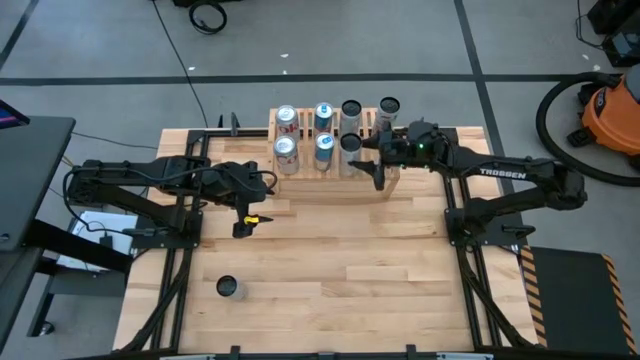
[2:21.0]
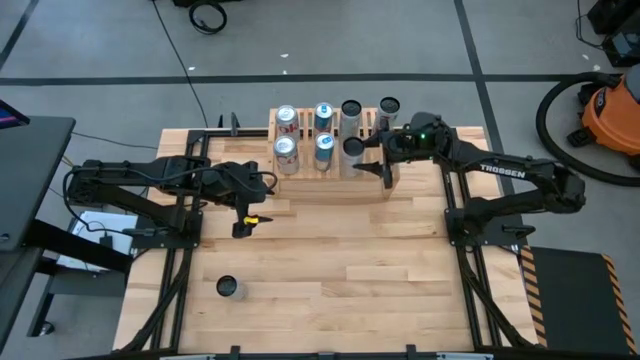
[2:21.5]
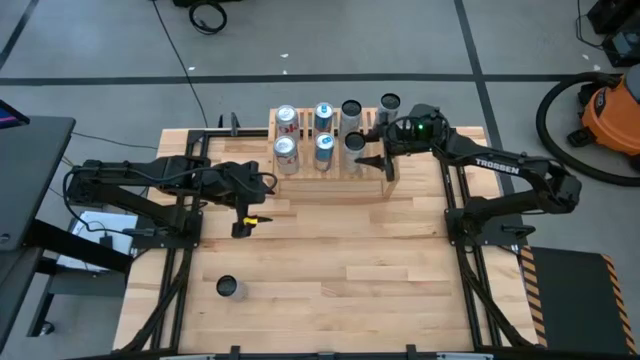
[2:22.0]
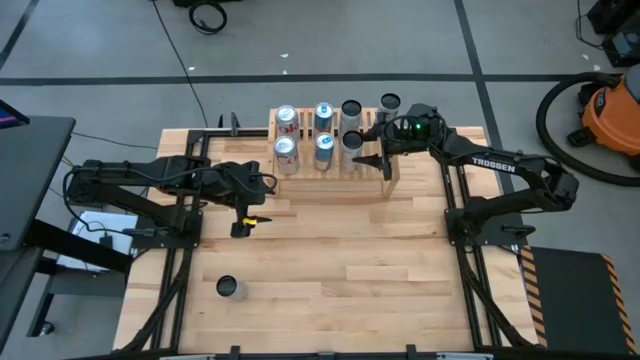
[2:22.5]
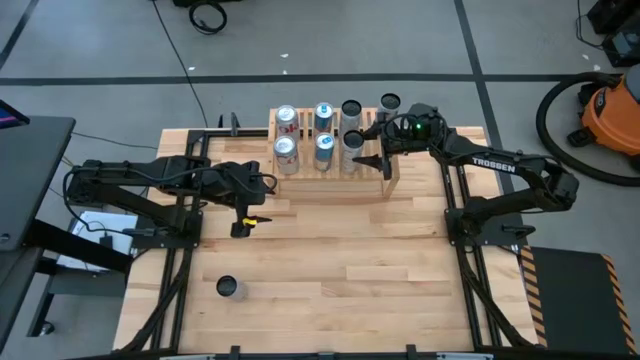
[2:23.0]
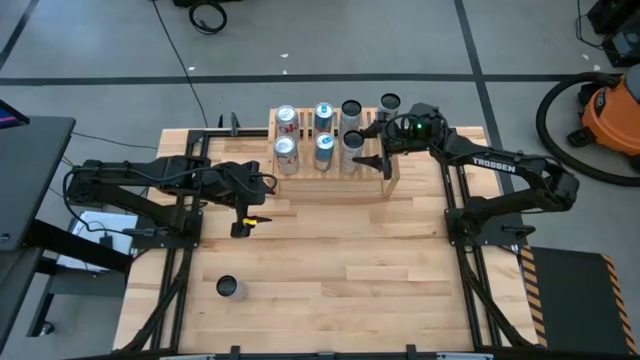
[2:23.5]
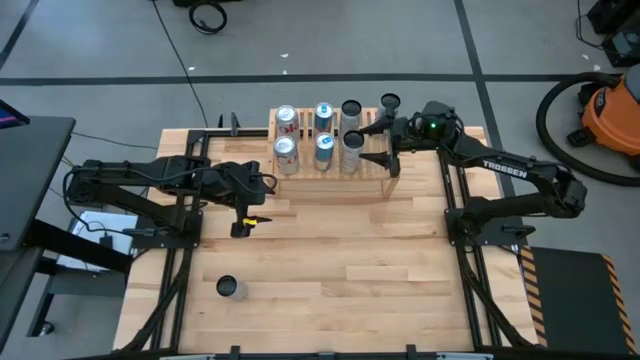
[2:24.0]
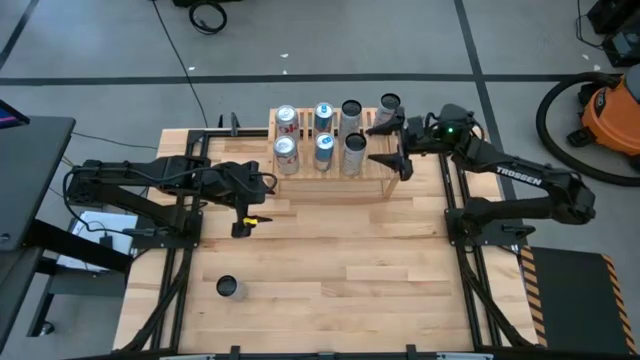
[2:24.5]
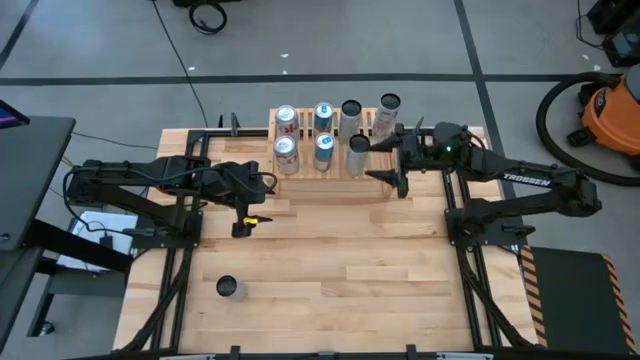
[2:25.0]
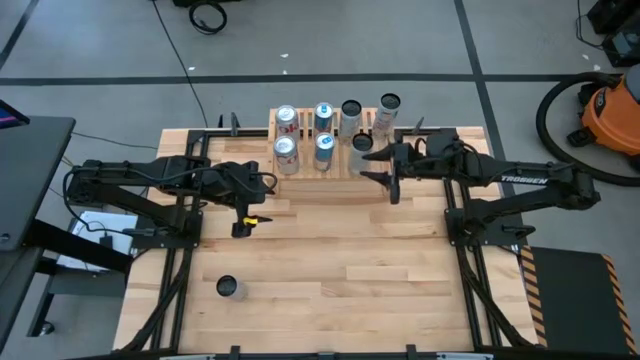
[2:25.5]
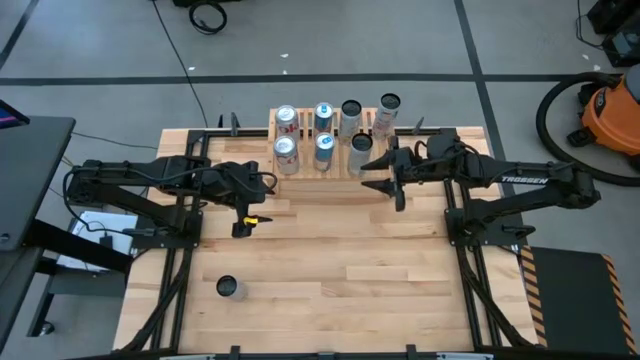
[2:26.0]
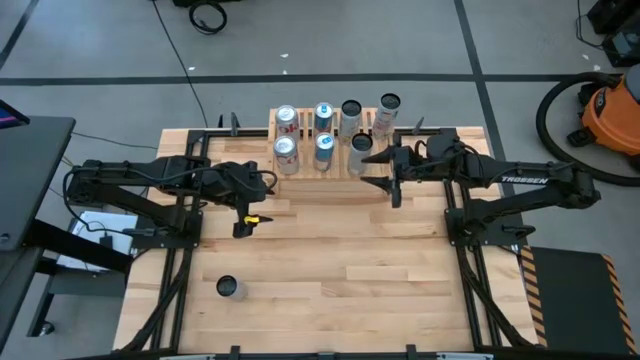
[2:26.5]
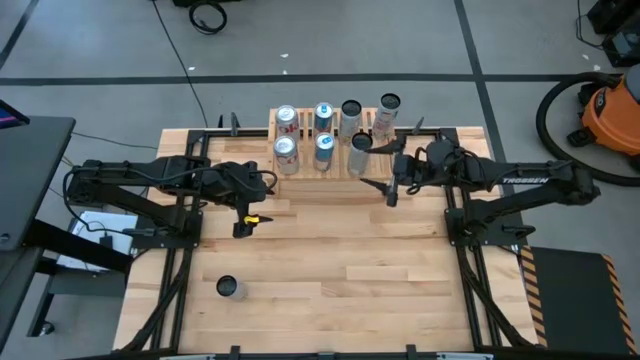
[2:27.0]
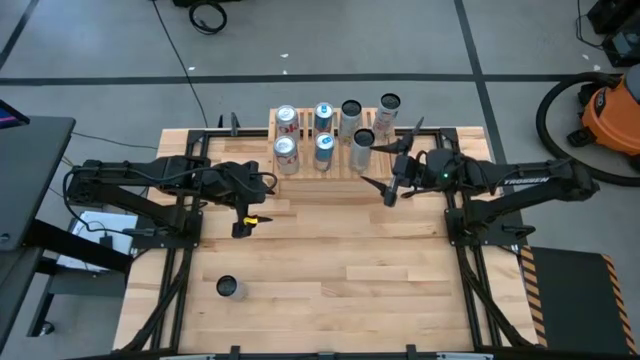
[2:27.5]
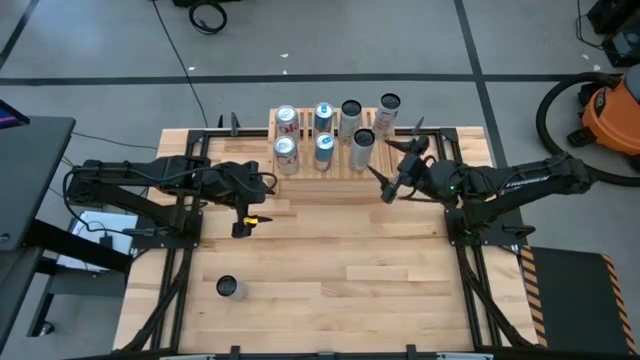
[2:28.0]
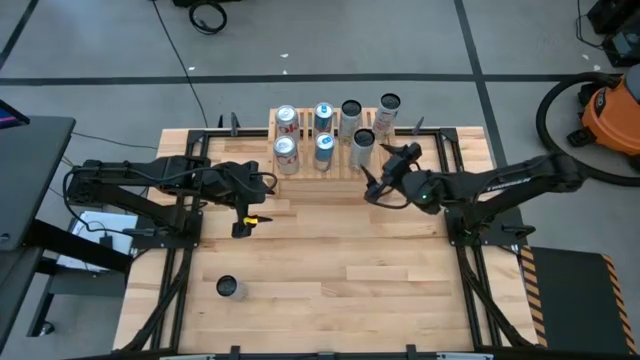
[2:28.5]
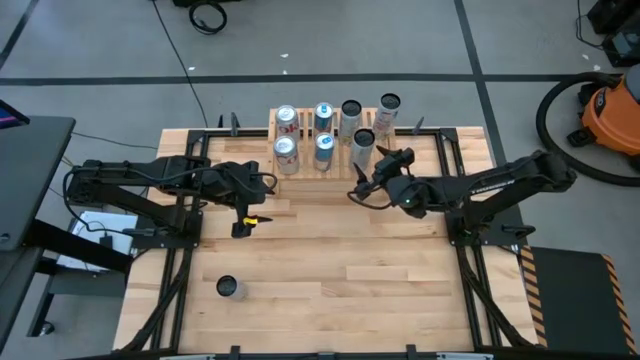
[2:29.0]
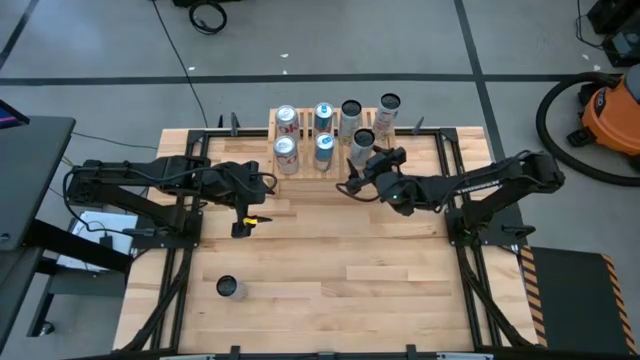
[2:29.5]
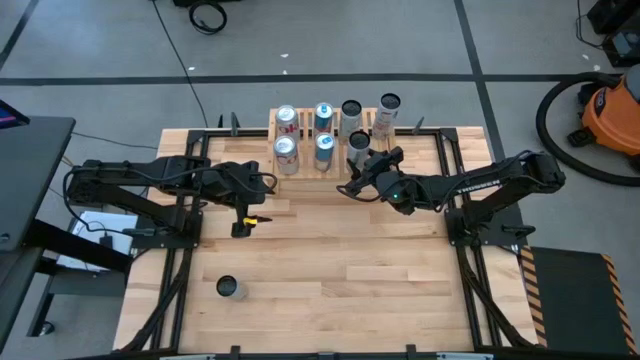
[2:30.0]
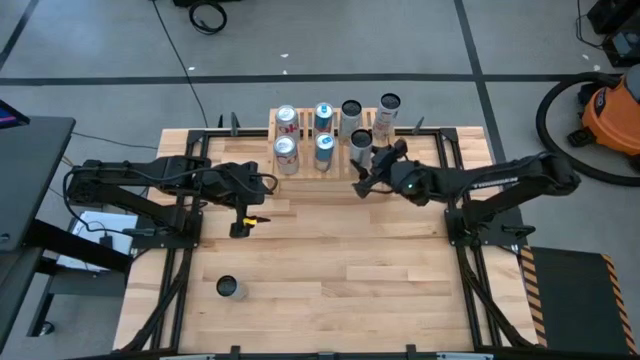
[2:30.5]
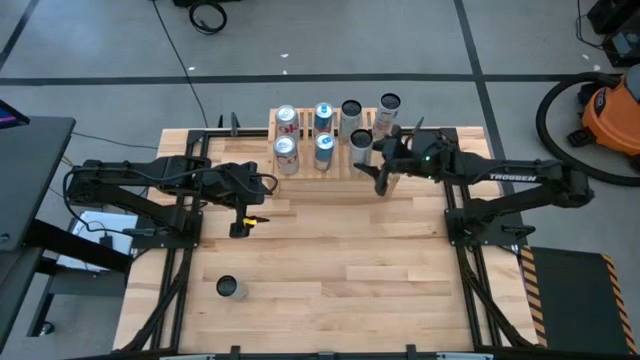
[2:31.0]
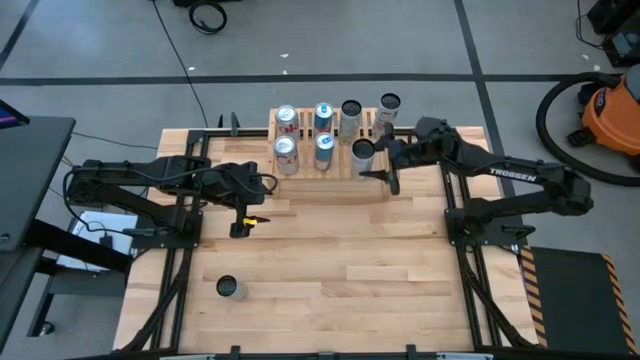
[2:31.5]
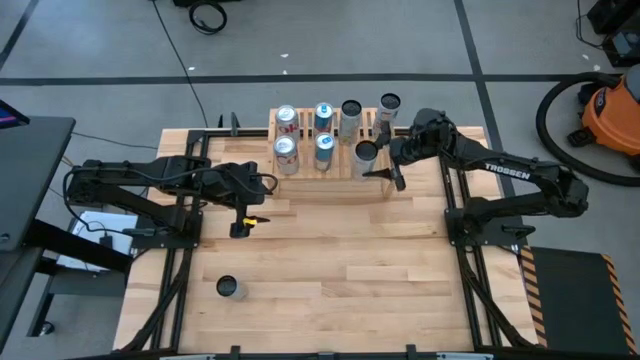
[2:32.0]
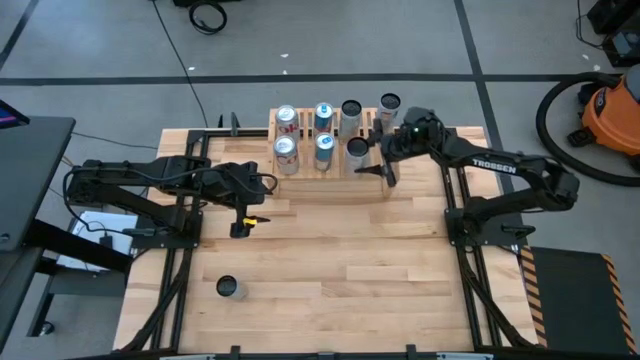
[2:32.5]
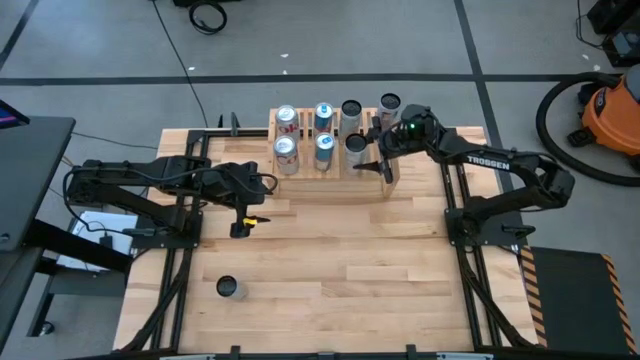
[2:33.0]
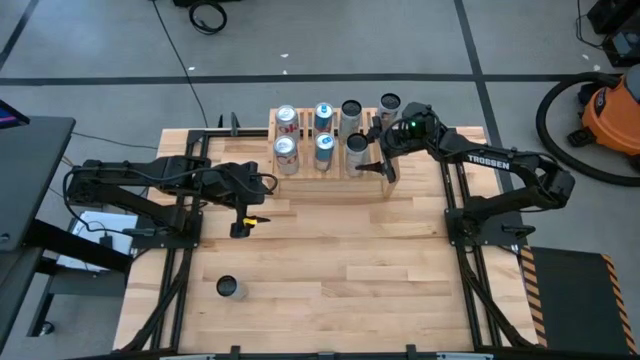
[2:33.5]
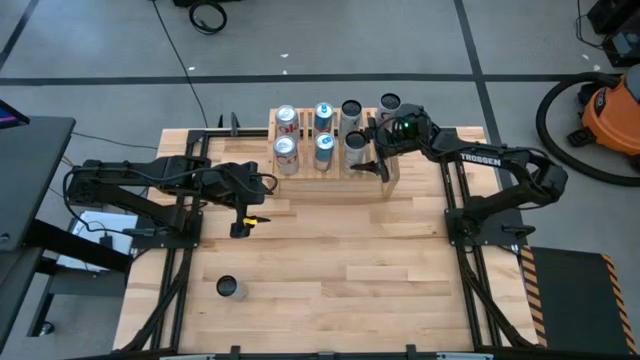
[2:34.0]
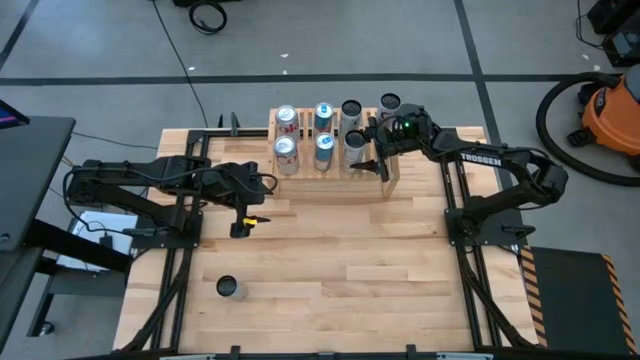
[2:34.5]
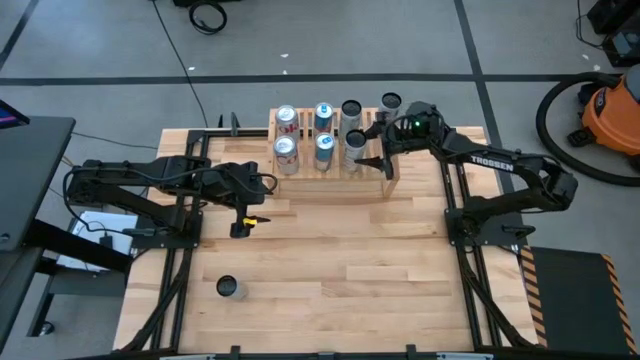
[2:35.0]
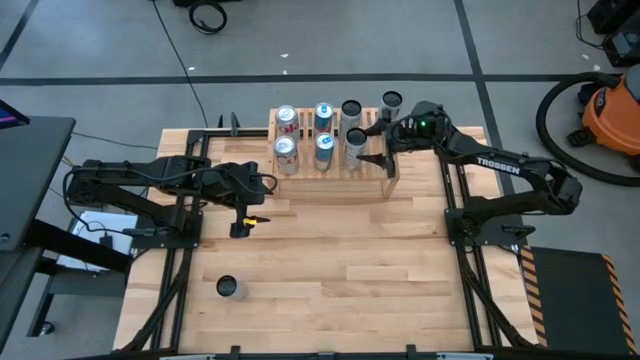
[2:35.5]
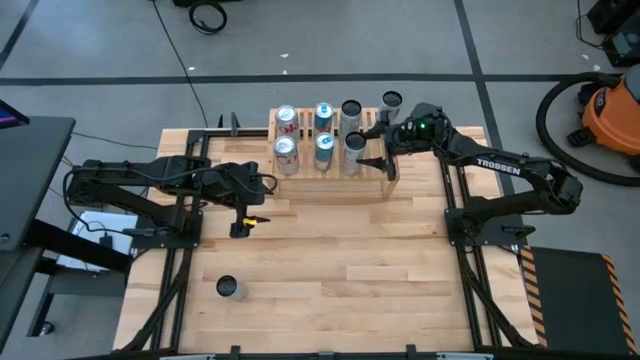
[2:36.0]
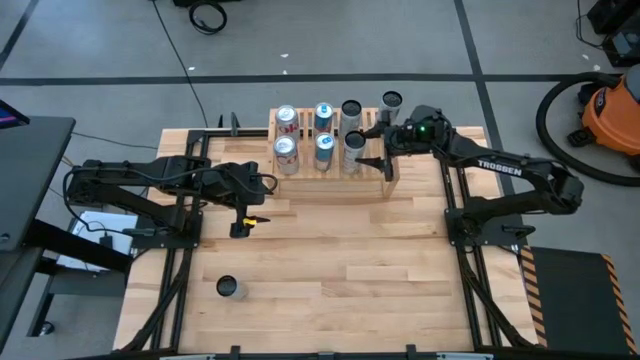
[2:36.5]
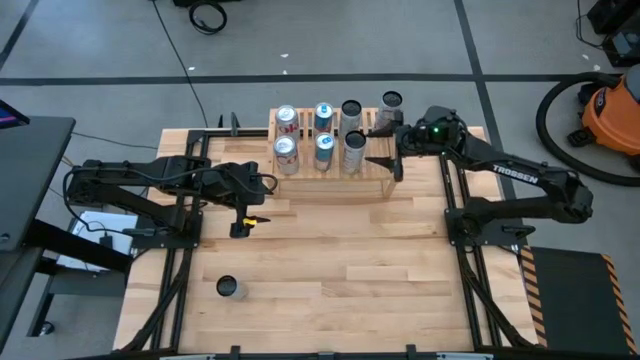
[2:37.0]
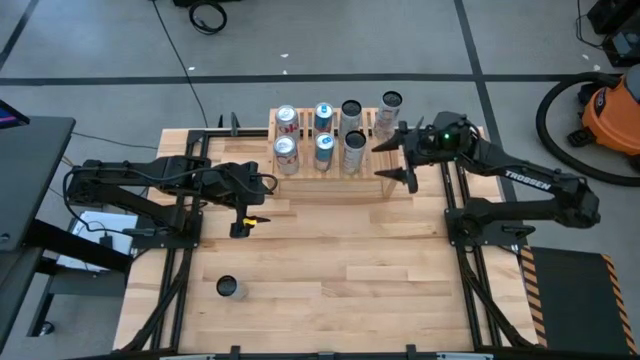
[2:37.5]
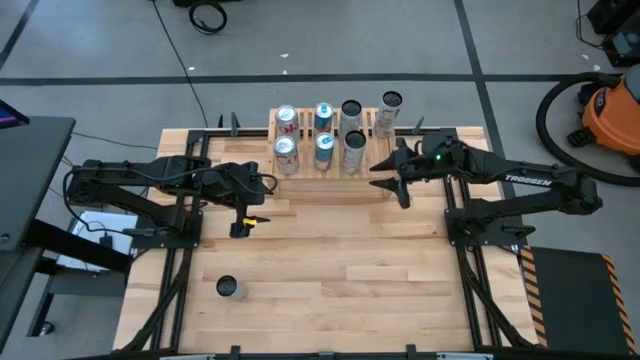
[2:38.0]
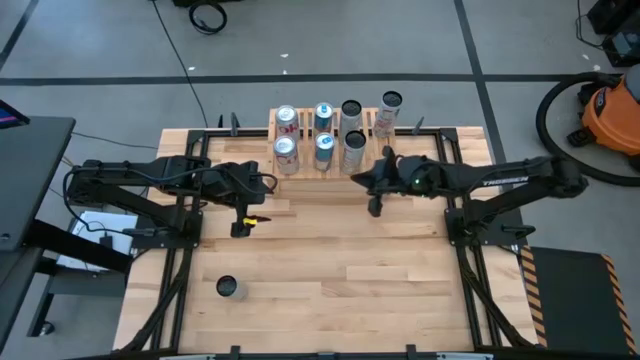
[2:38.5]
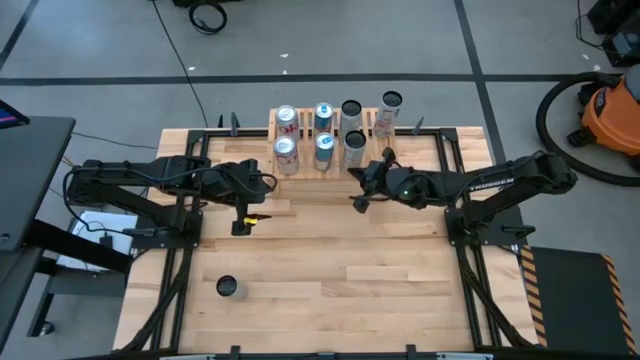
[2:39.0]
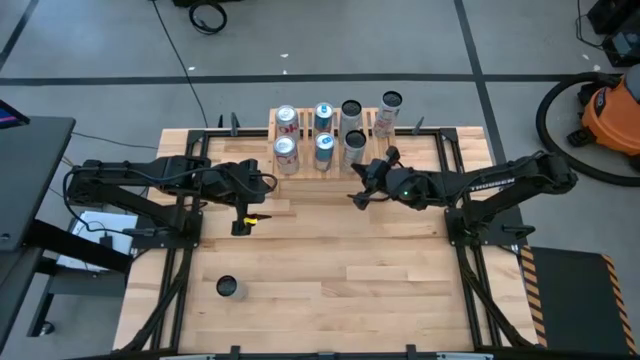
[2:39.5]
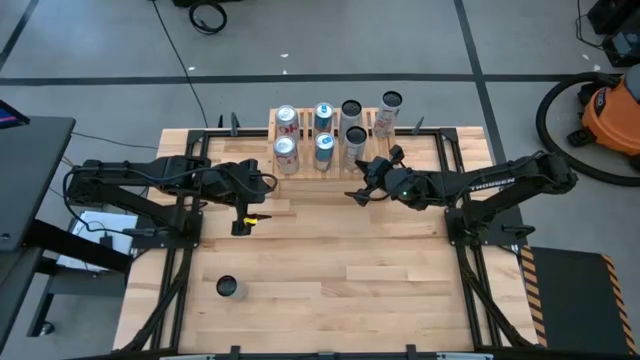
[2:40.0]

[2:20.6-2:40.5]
Task: Place canned beverage on shelf
Put the white-yellow soda can aligned with the other white-yellow soda can on the shelf
